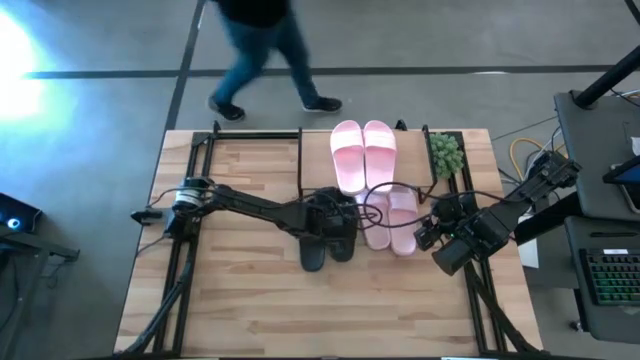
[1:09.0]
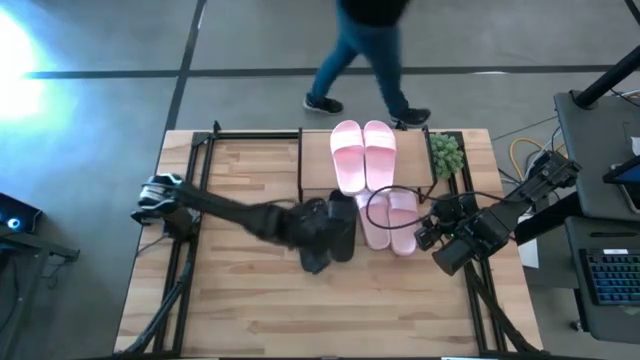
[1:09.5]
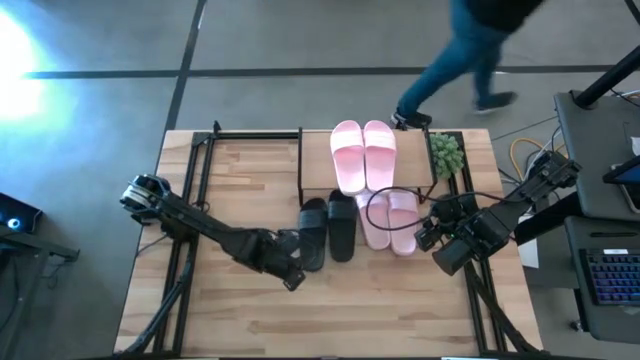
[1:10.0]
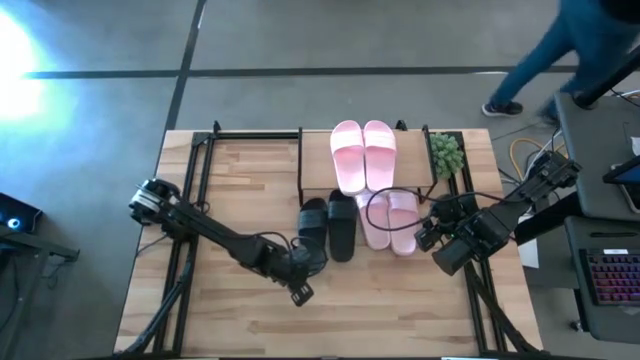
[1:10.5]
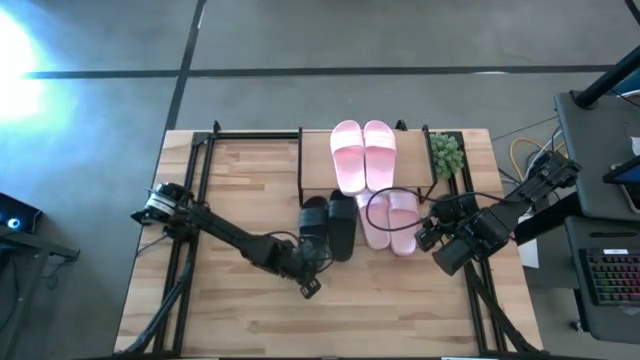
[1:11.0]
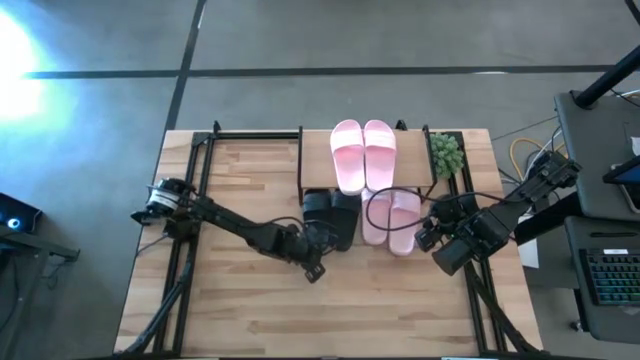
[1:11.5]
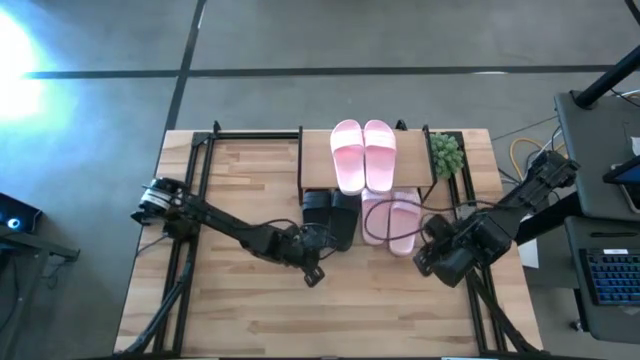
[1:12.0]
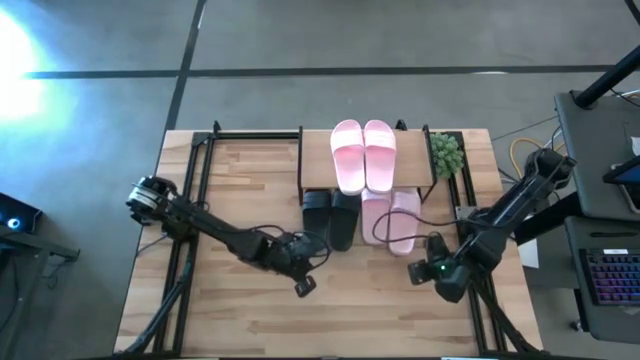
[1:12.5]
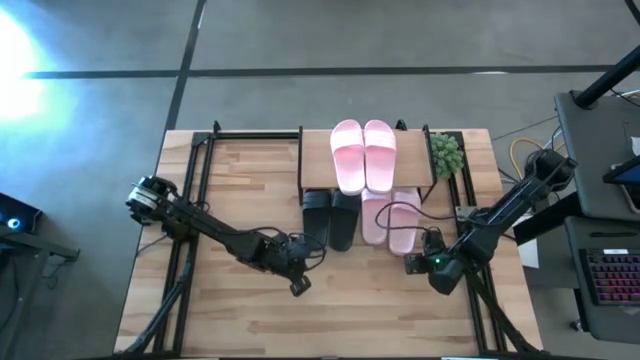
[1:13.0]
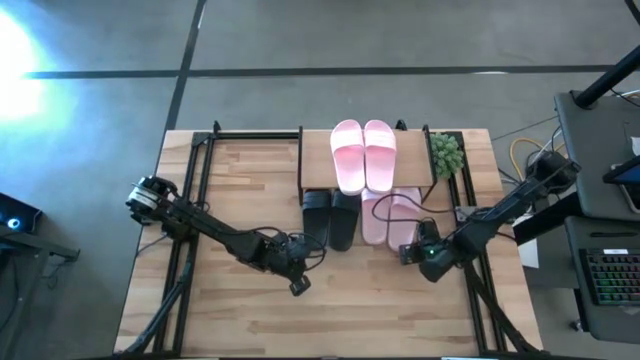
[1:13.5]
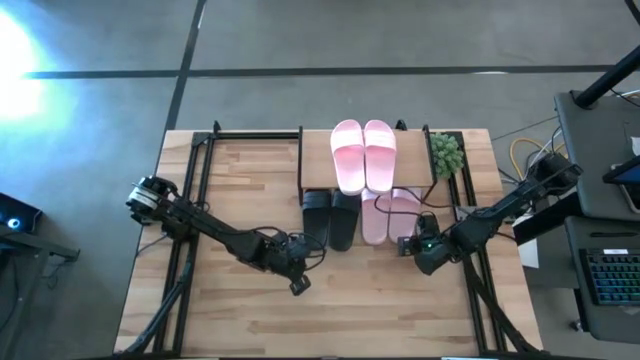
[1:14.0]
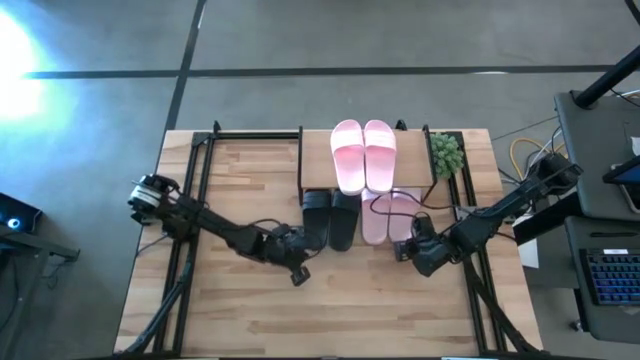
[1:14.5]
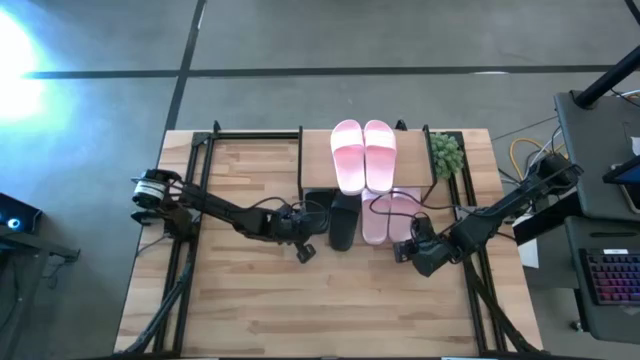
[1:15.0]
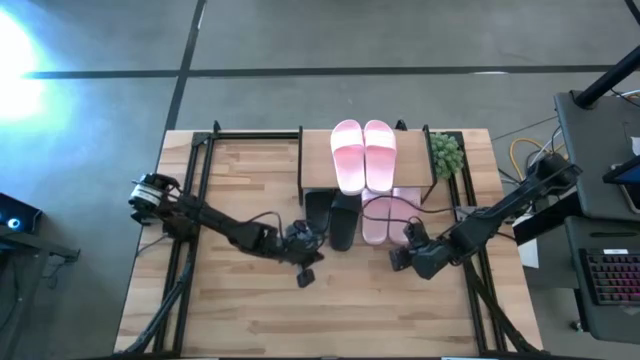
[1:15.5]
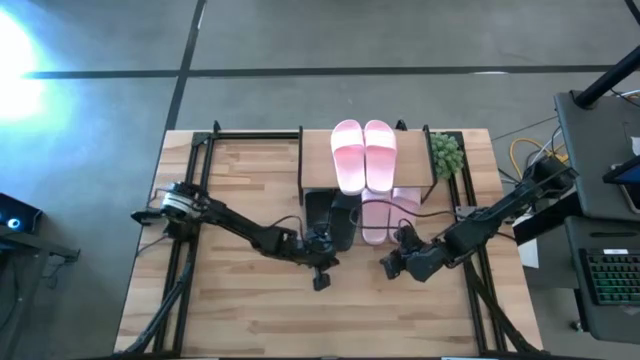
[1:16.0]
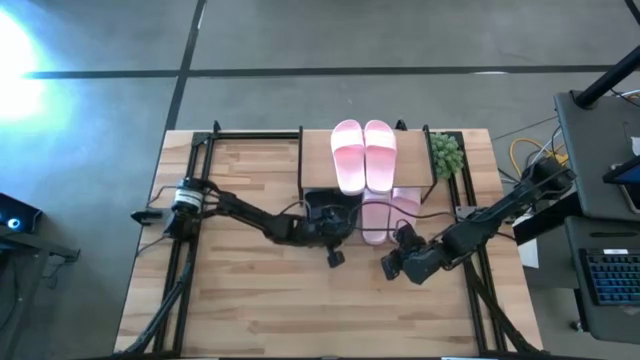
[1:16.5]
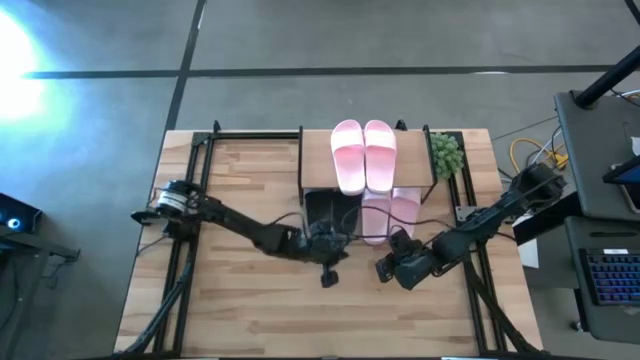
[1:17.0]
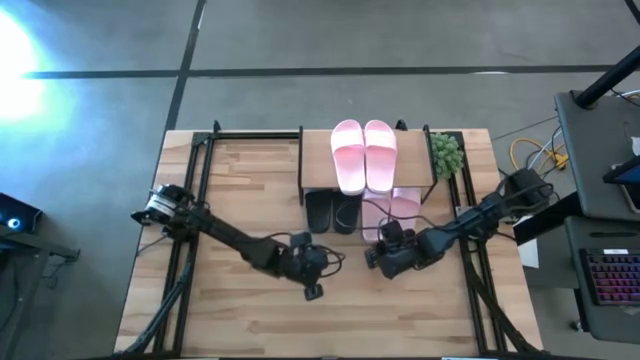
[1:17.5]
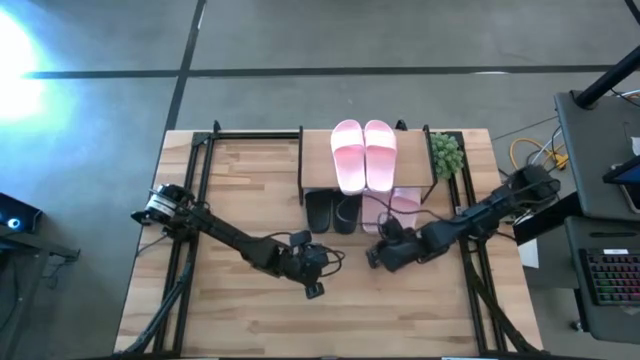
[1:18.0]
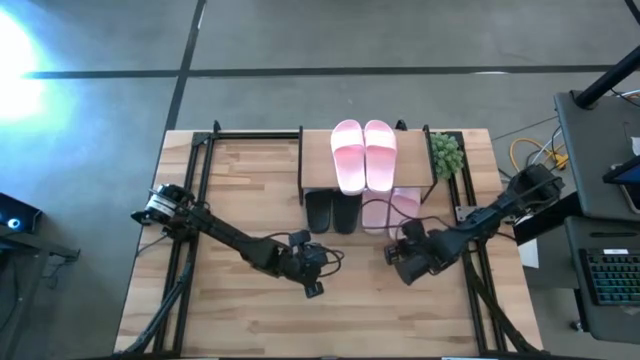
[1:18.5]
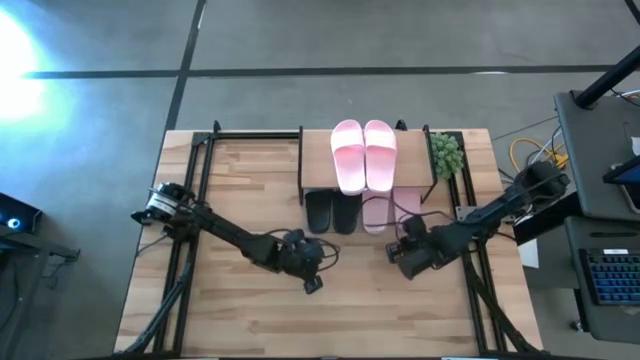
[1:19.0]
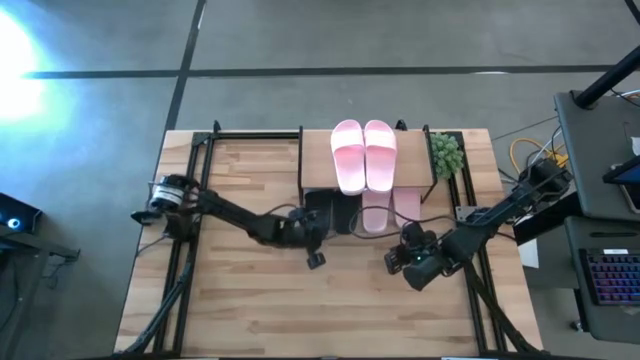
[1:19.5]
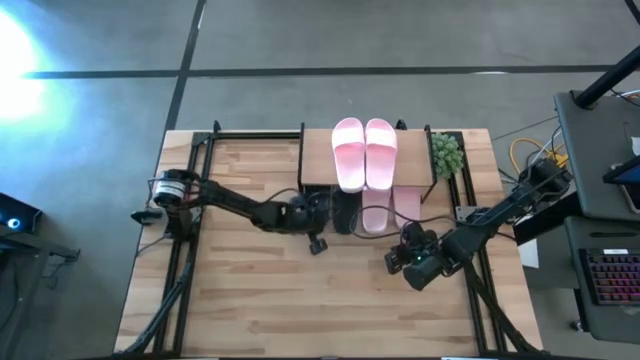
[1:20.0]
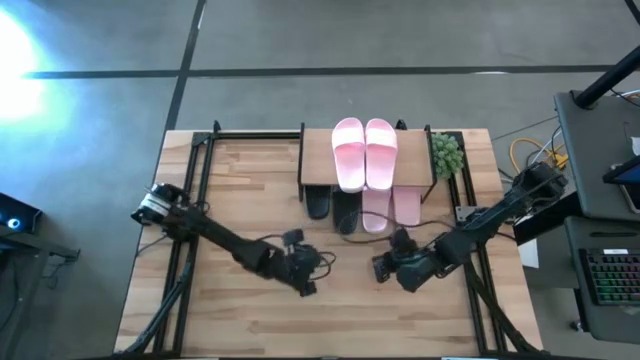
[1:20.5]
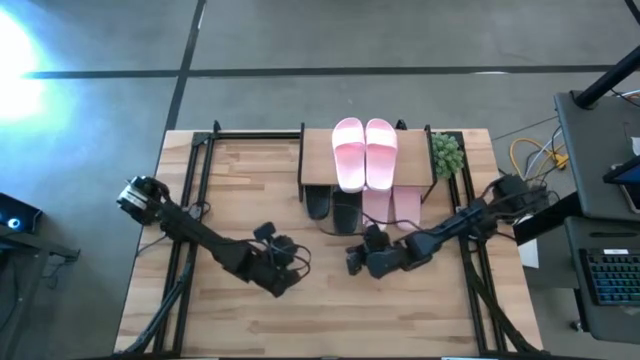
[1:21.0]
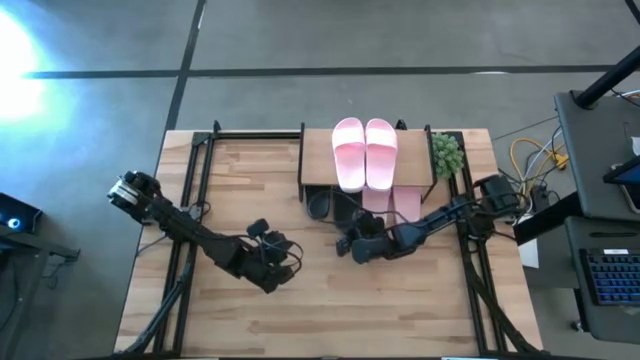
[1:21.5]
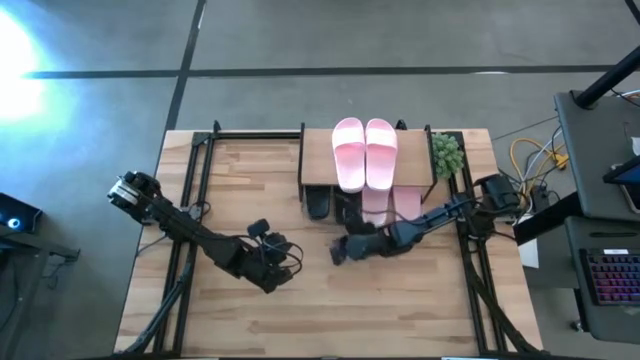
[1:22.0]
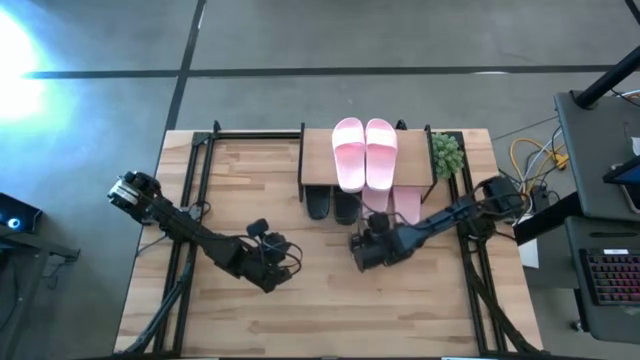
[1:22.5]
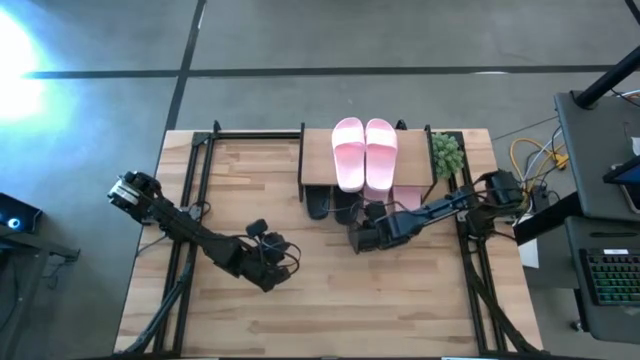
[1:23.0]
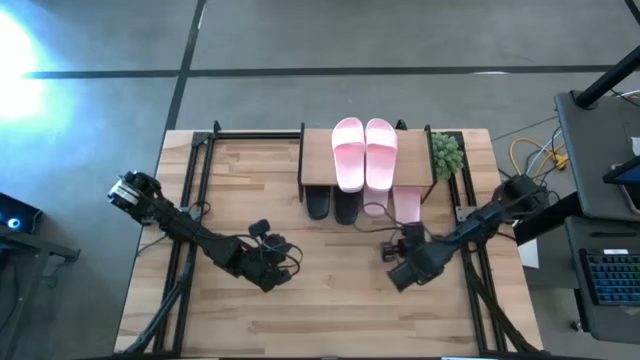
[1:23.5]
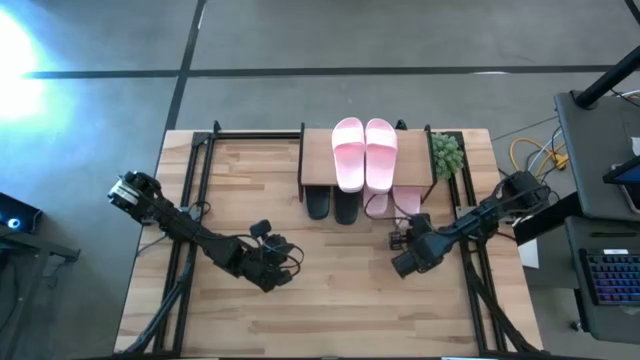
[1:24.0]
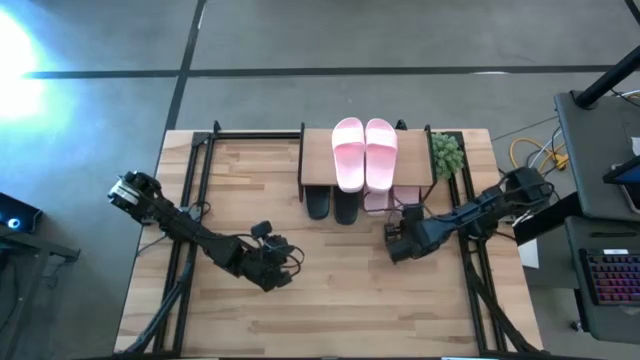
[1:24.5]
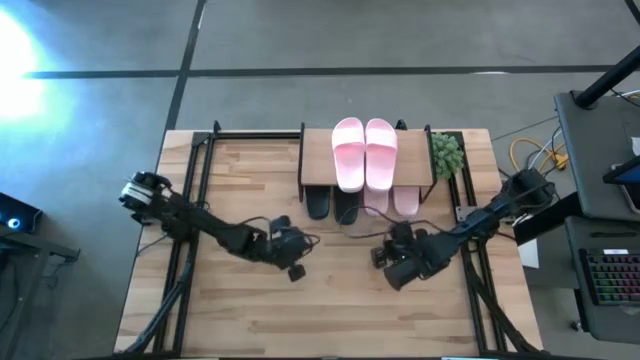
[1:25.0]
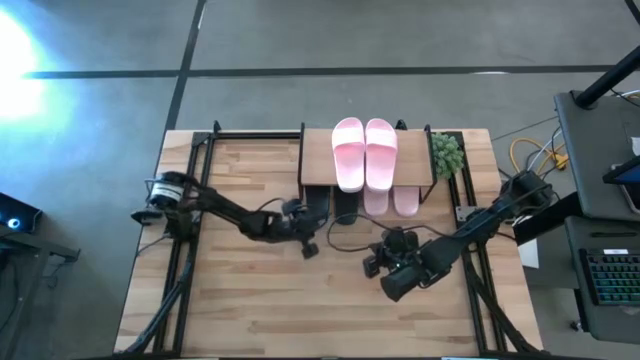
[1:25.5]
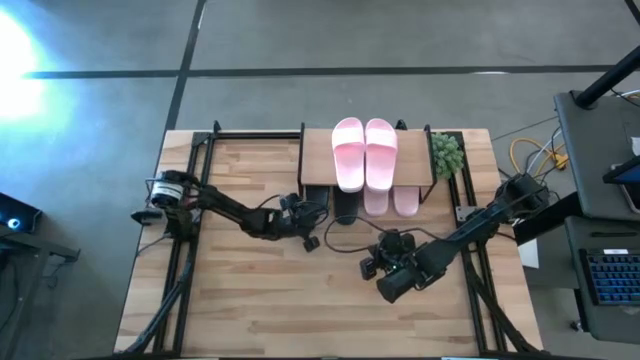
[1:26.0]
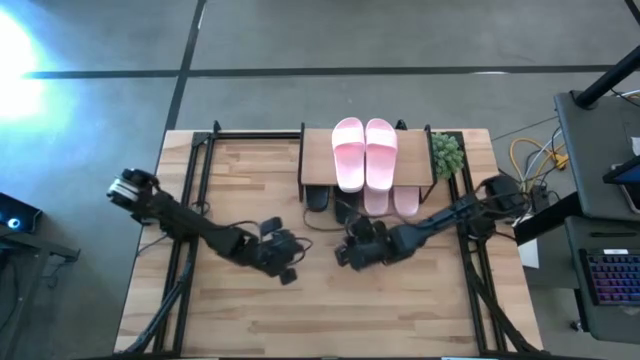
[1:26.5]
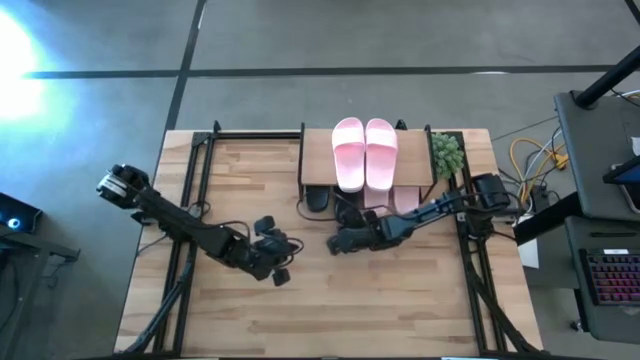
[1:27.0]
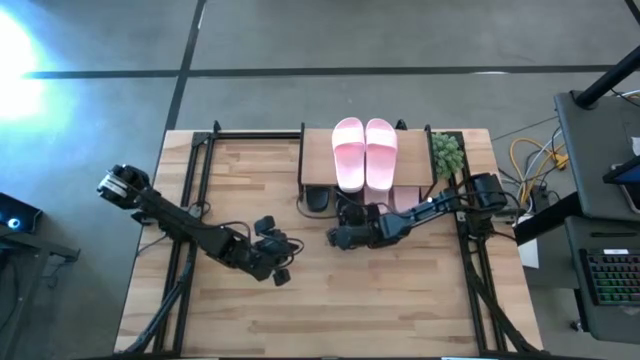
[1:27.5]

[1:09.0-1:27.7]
Task: Pick and place slides into the shelf
Adjust the slippers under the shelf

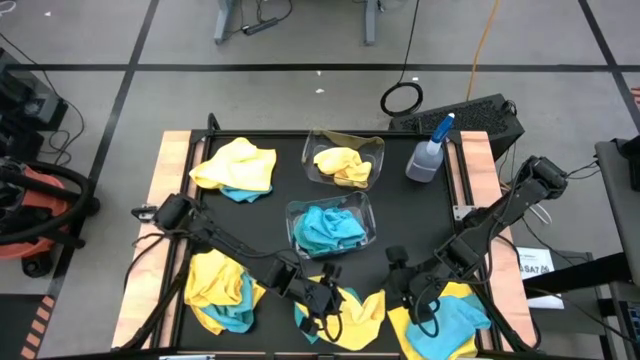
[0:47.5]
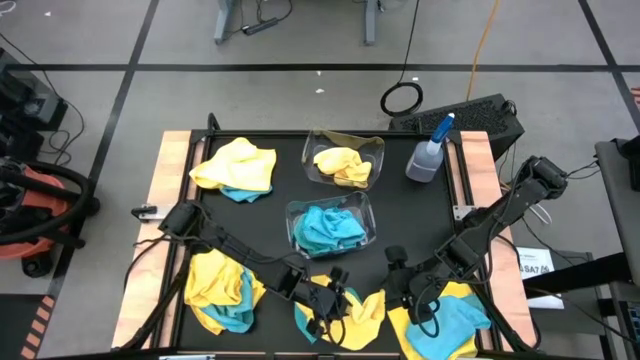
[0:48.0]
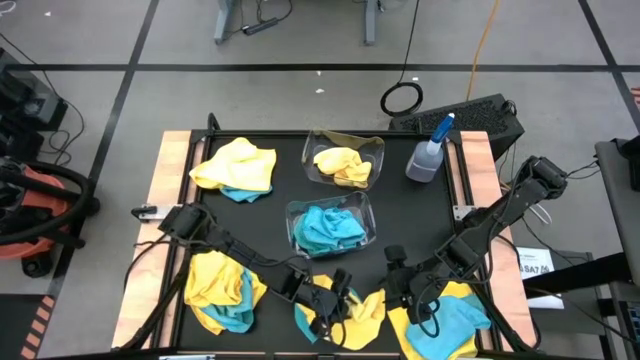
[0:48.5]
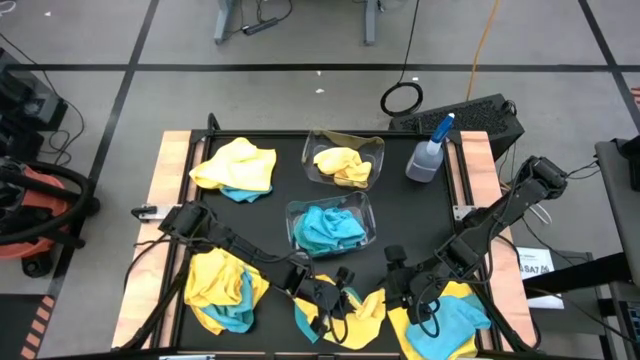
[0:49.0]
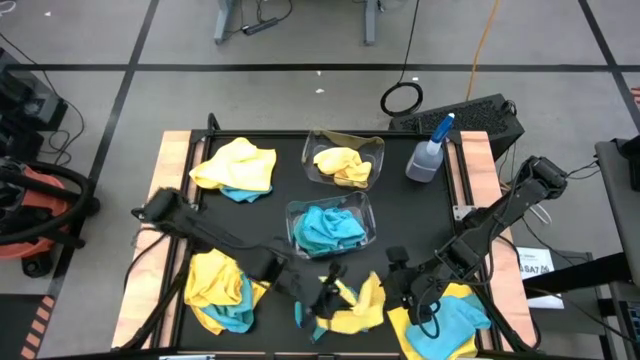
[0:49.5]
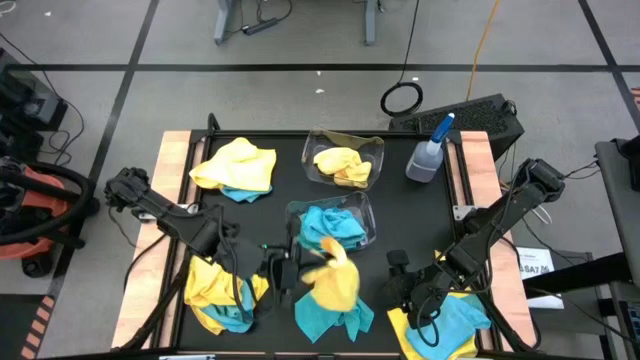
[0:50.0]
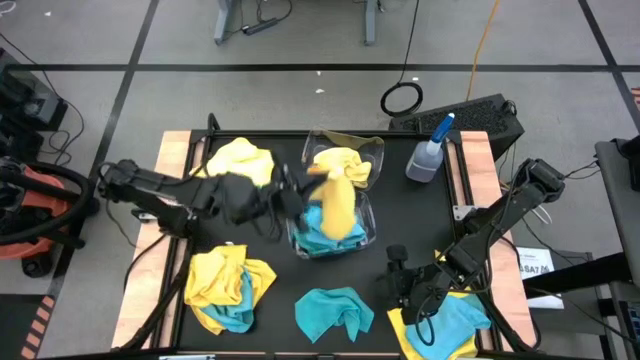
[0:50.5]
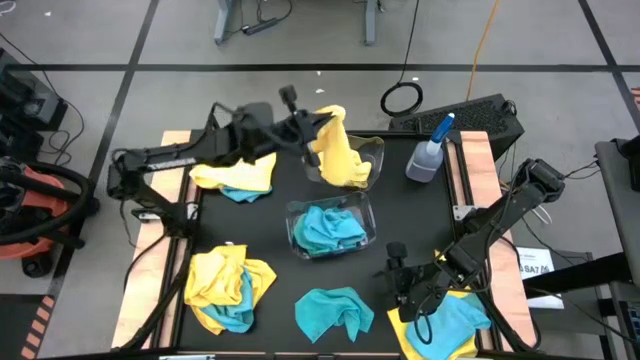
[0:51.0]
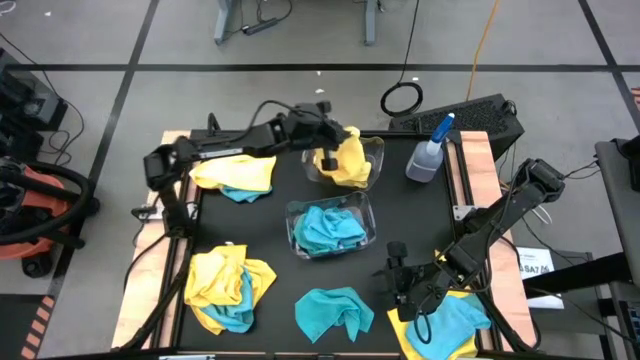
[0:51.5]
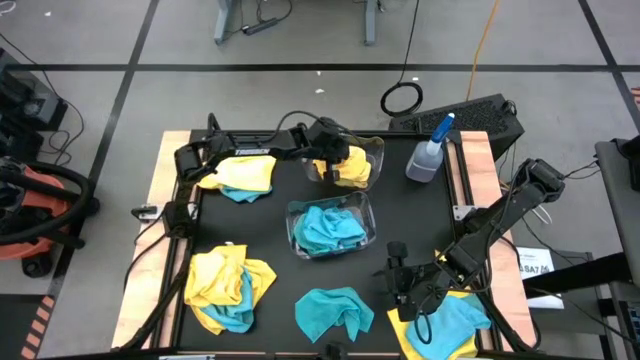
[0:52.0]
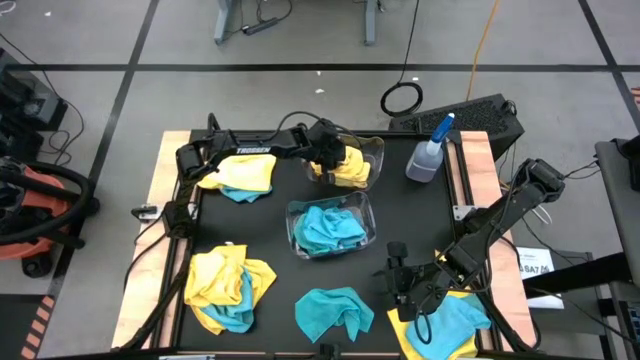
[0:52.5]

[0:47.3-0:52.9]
Task: Sort microfiber towel by color & place in baskets
Put the yellow microfiber cloth into the top transparent bin
